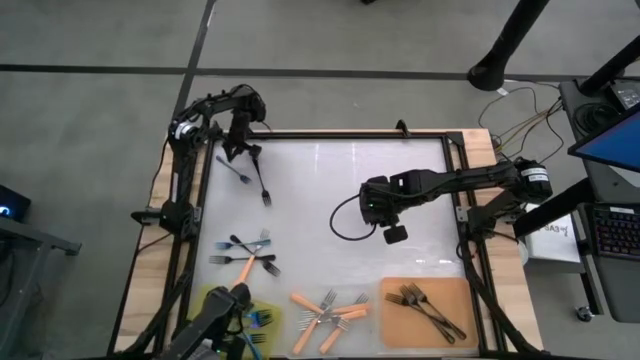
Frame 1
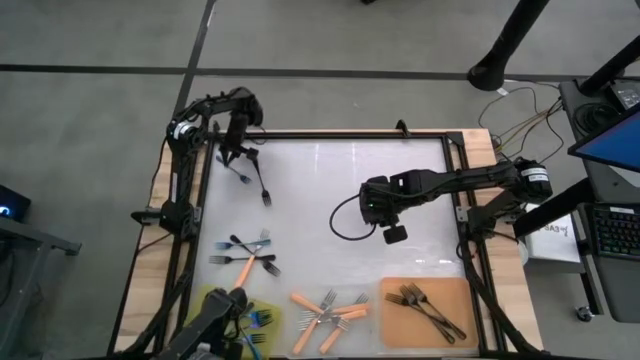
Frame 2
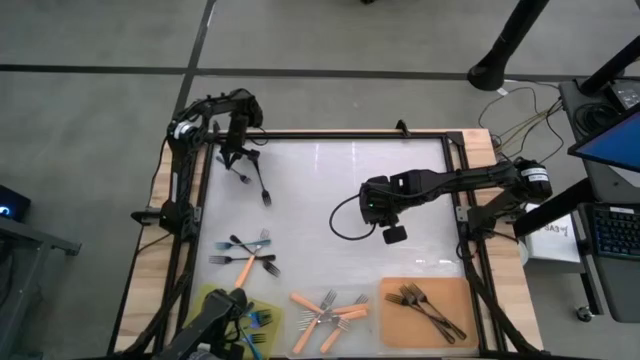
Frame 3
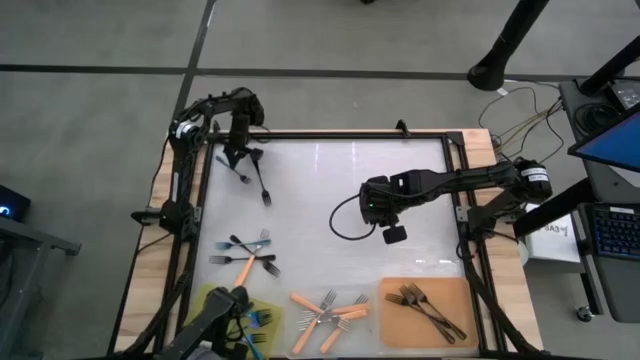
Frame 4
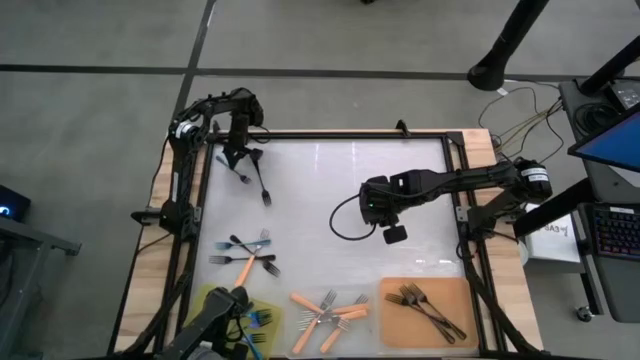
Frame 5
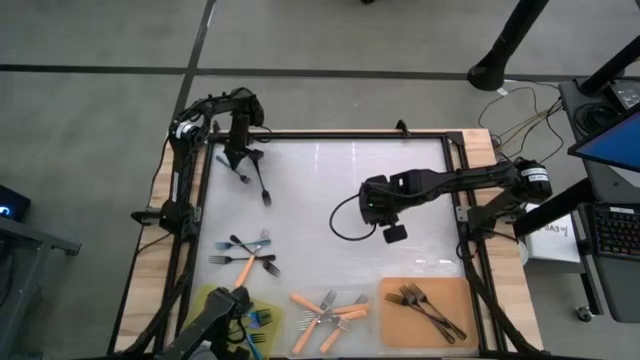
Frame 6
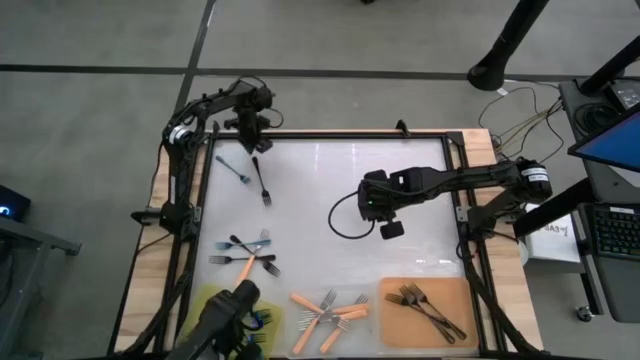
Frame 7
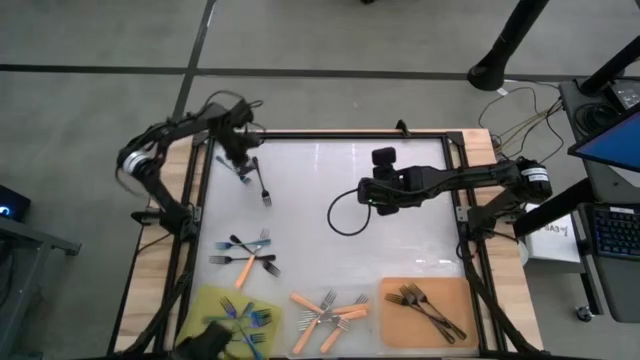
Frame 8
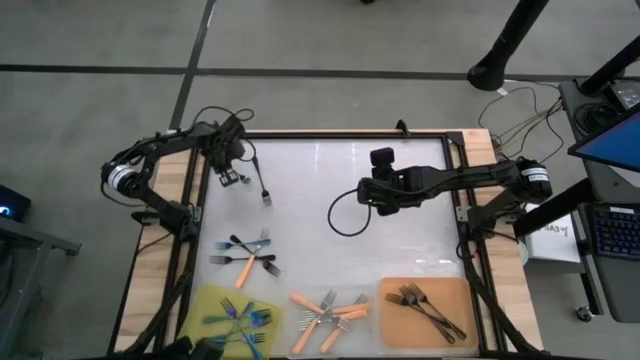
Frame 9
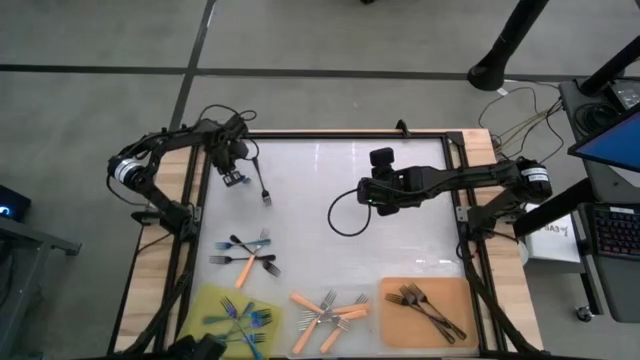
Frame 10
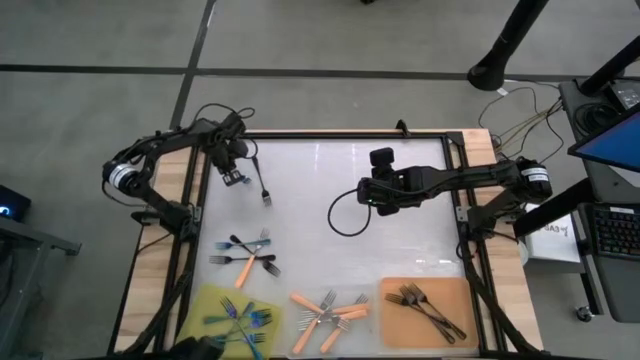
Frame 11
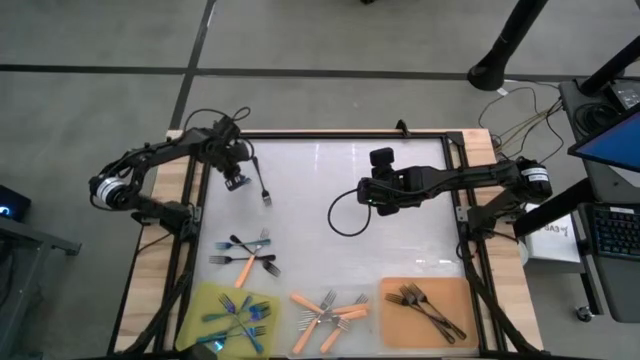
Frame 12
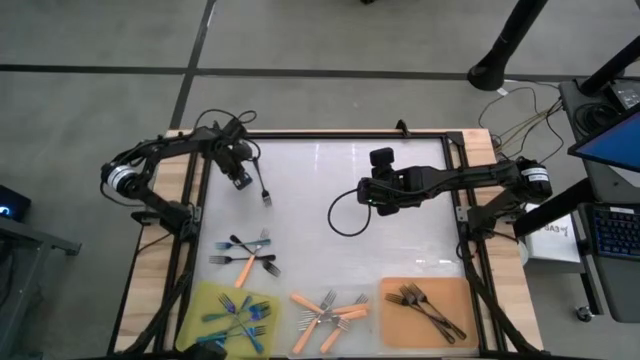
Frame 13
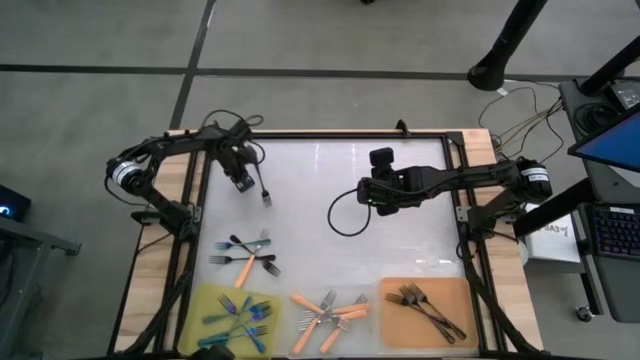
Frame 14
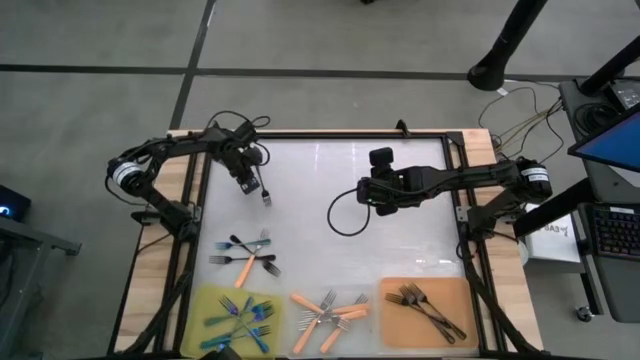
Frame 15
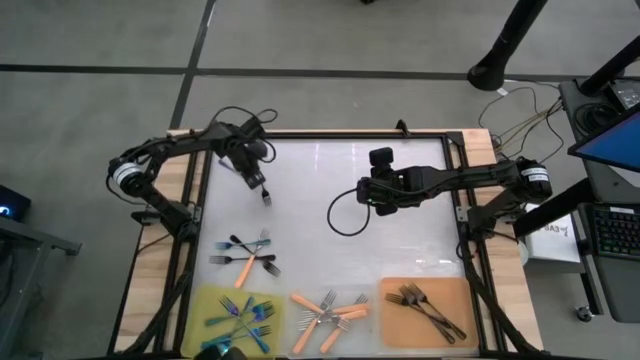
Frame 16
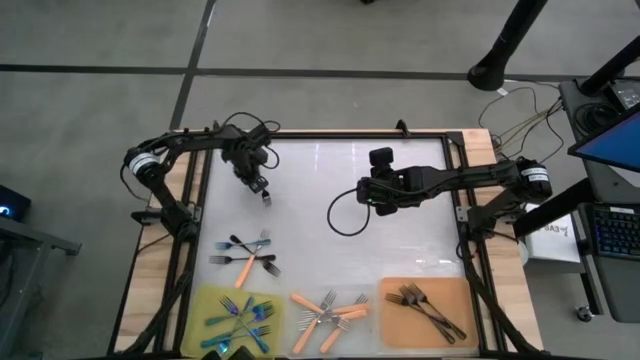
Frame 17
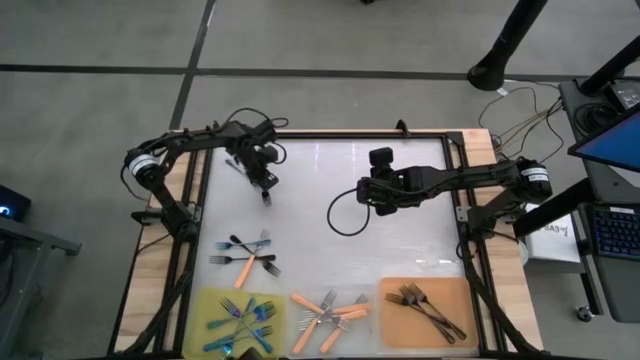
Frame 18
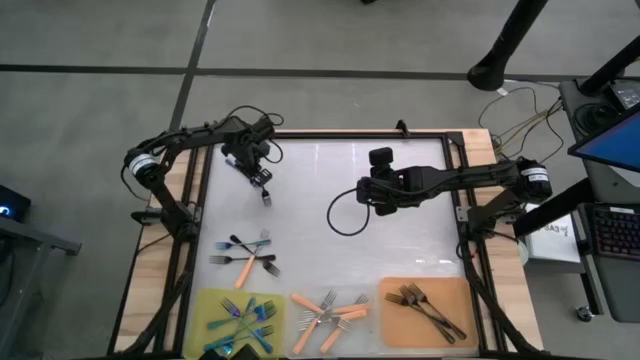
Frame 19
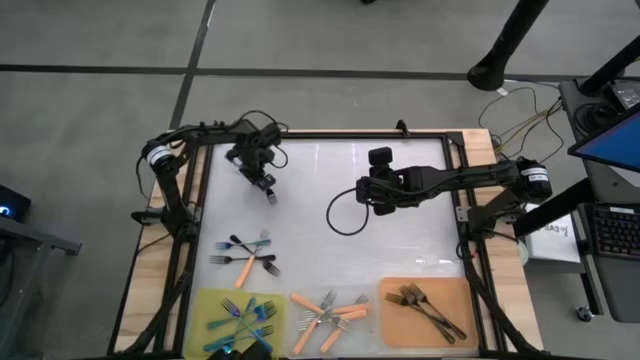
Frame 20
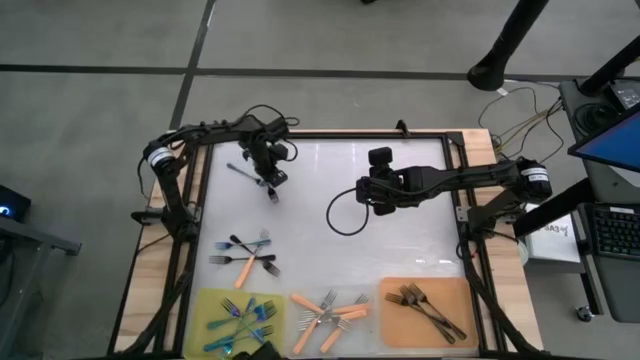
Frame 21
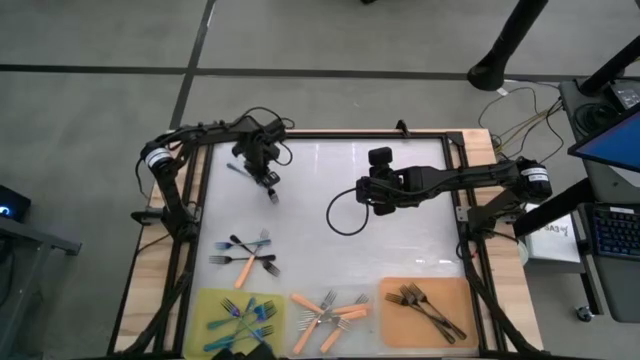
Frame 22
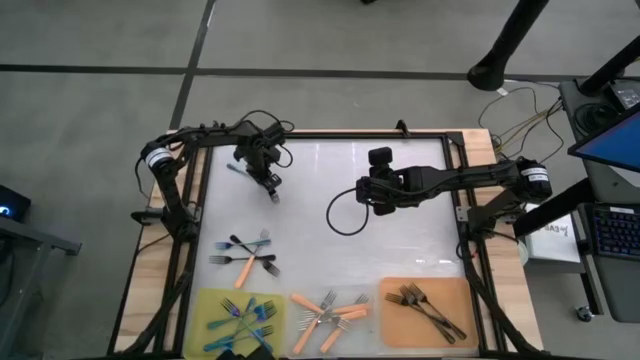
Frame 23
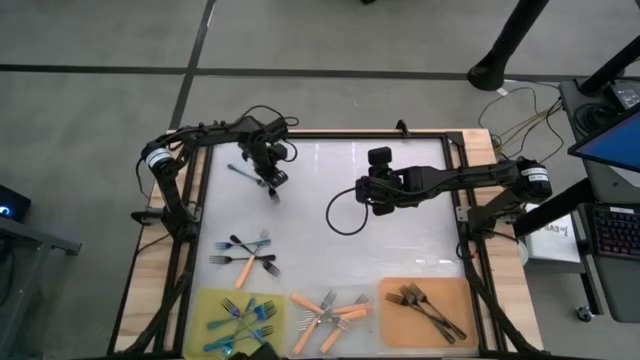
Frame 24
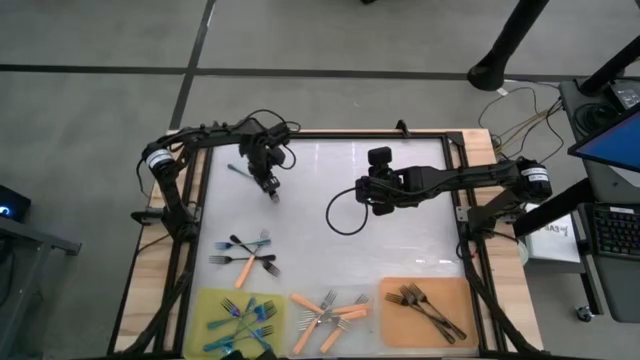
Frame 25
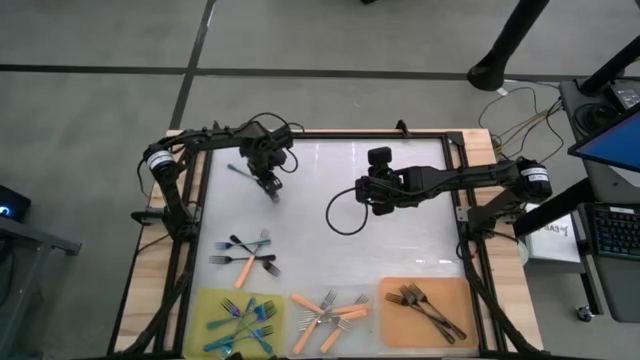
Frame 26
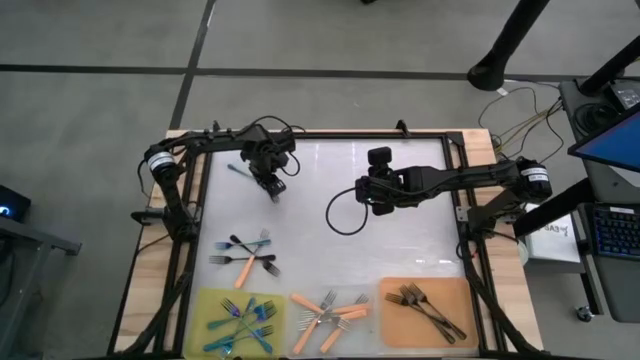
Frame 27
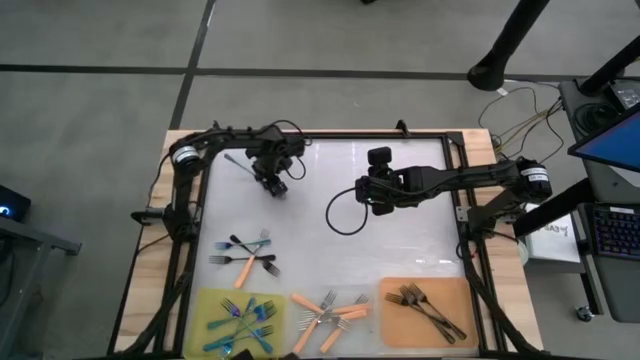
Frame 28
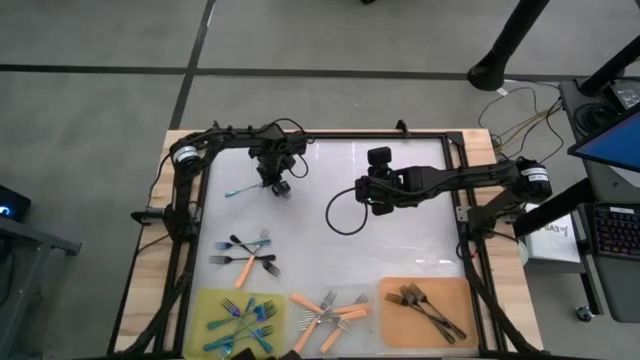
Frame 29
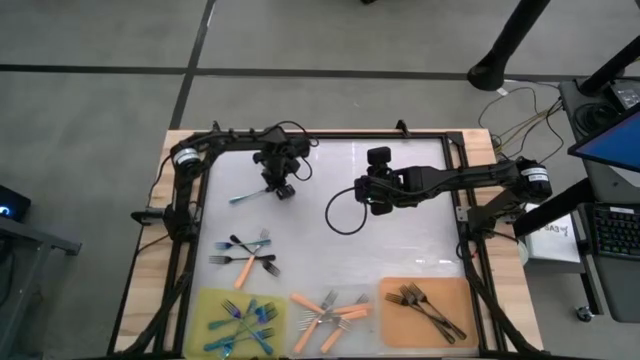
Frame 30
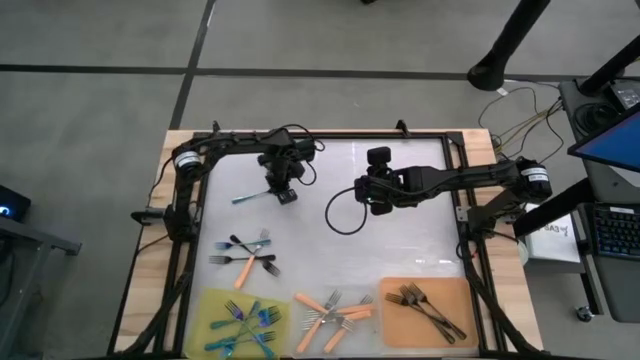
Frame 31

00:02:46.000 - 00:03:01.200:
Task: Sort silverware by color (type)
Put the blue fork into the yellow bin

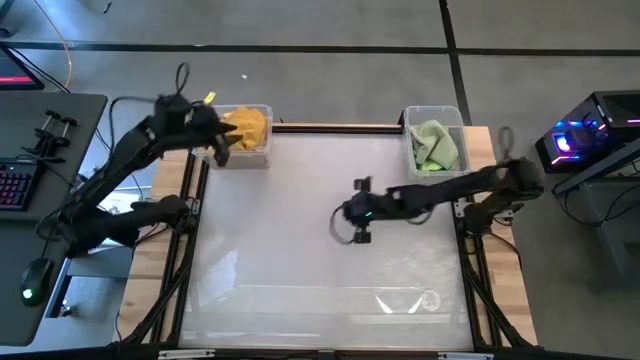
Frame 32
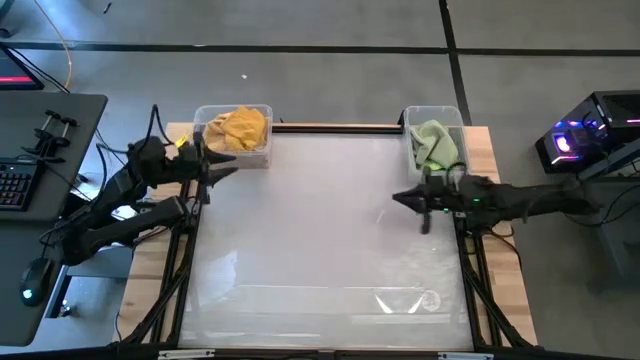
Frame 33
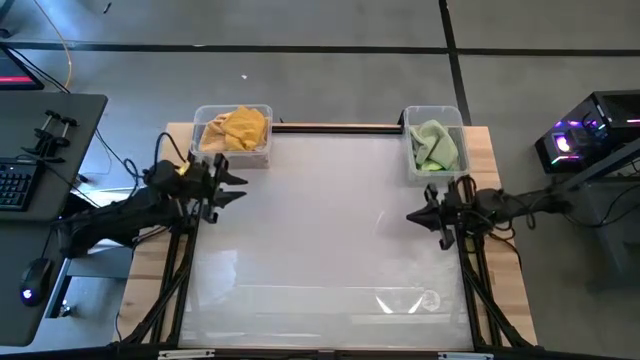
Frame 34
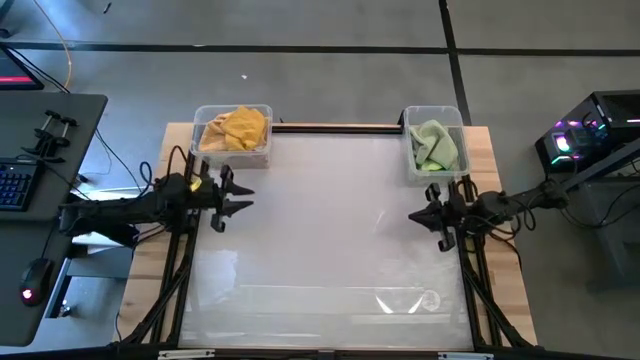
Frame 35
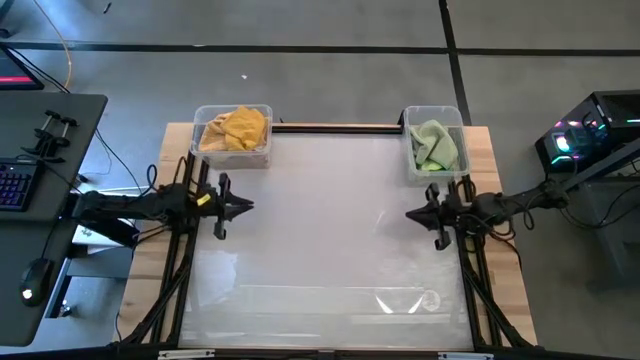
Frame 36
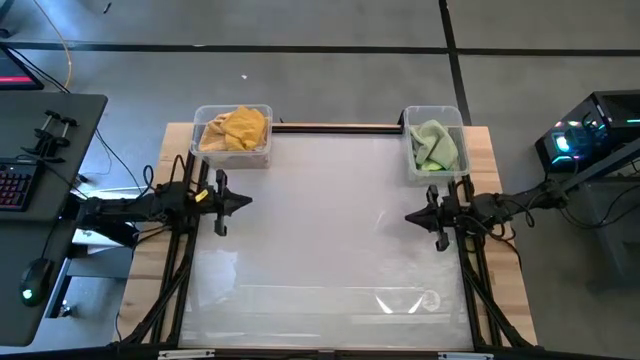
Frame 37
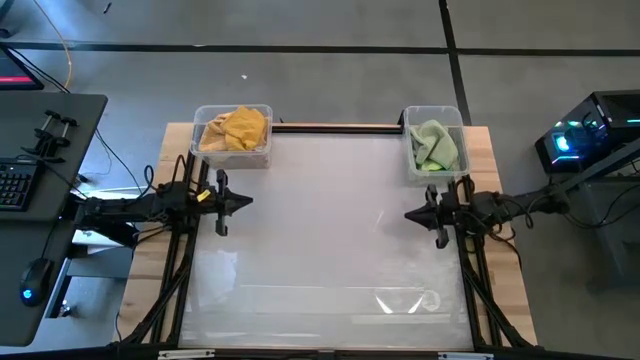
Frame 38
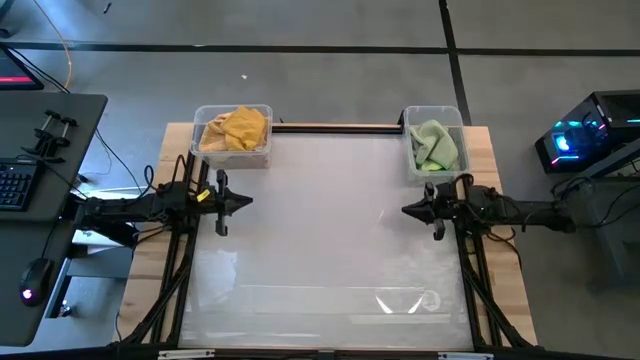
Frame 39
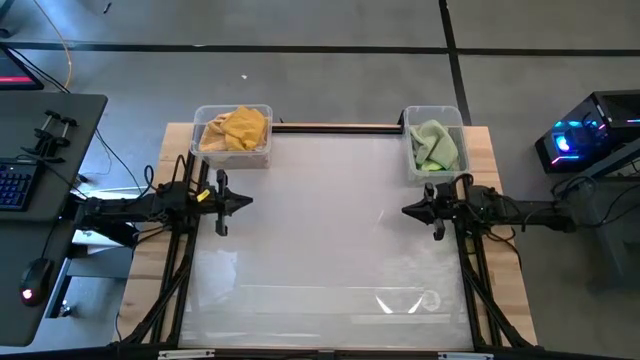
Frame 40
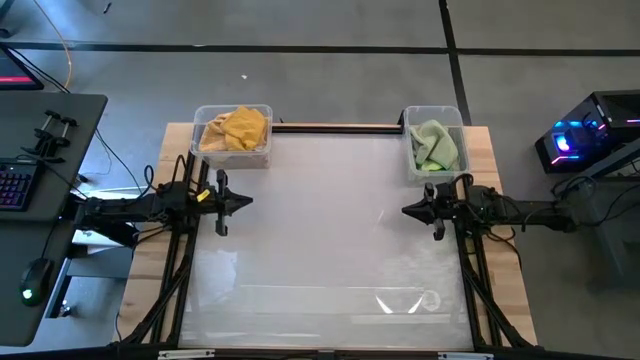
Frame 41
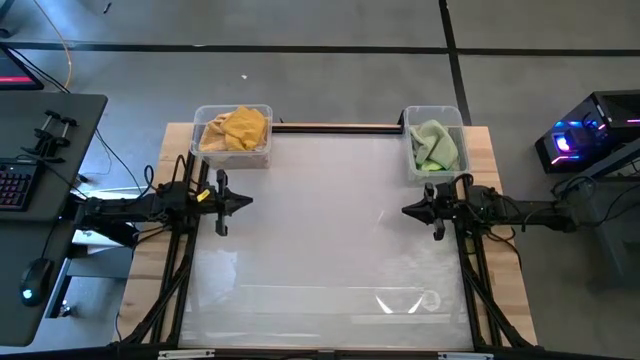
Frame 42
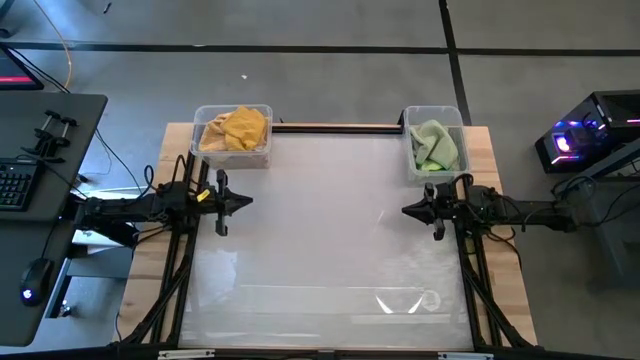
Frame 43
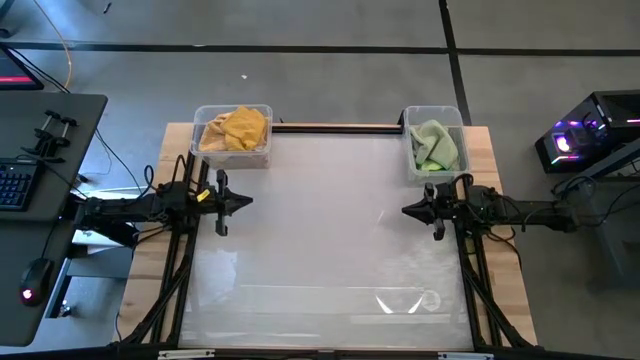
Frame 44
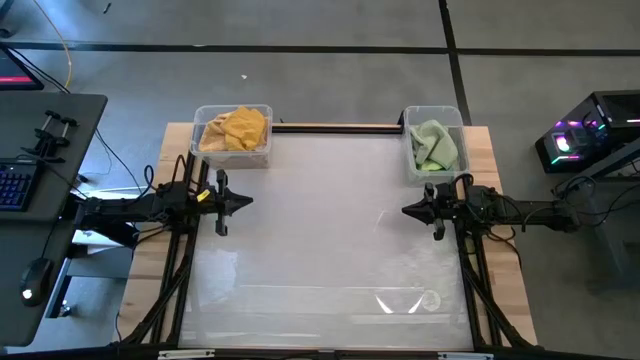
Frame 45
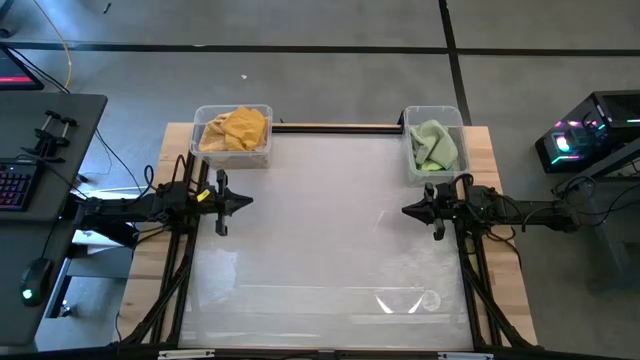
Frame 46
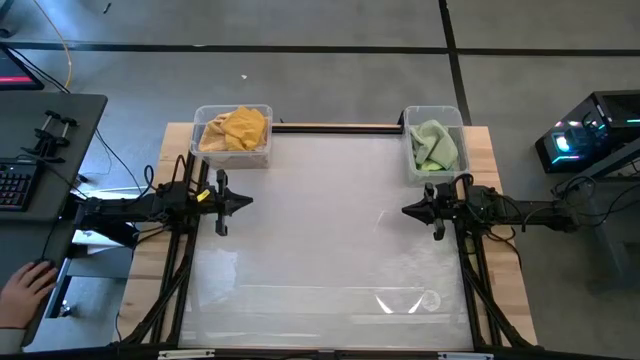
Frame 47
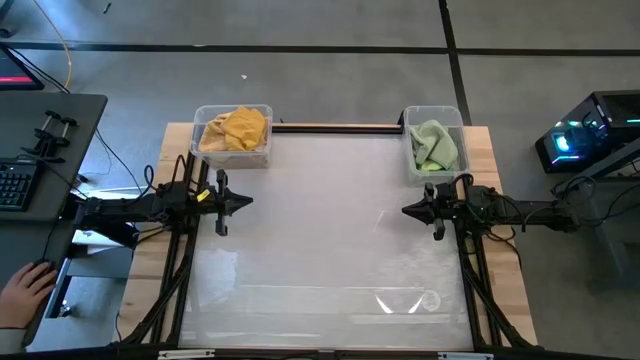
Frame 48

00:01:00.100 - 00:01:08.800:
Task: Sort towels by color in basket
Return to Home Position
